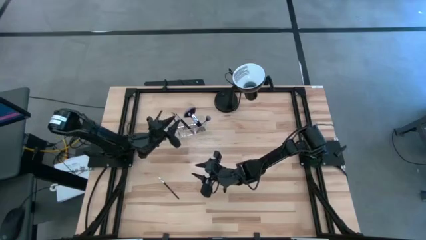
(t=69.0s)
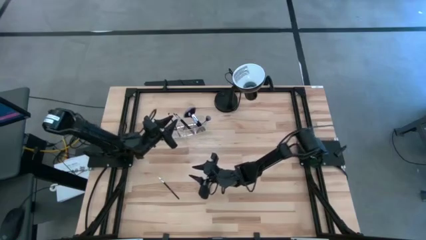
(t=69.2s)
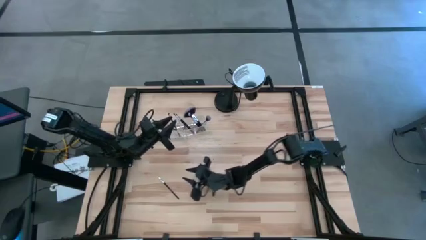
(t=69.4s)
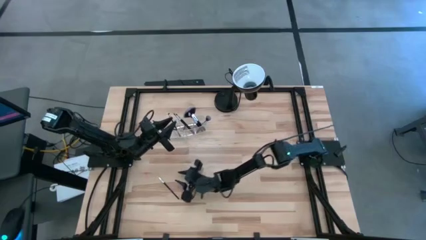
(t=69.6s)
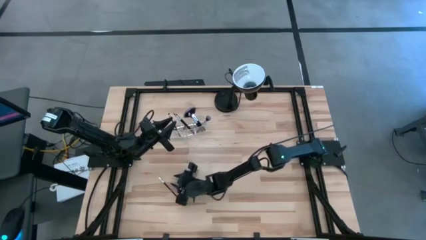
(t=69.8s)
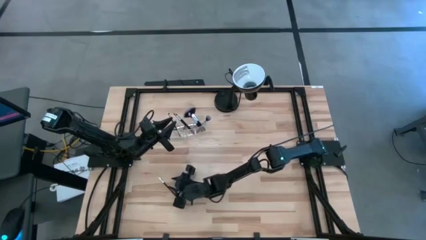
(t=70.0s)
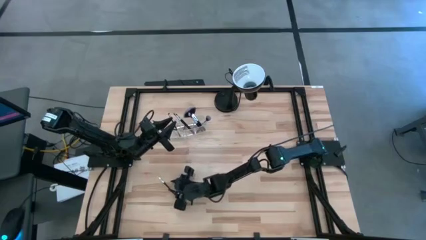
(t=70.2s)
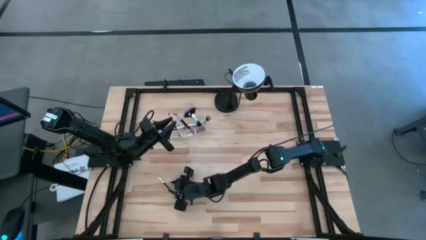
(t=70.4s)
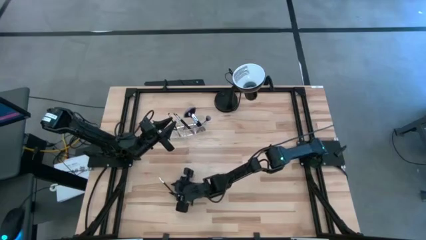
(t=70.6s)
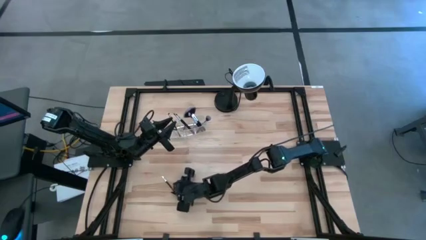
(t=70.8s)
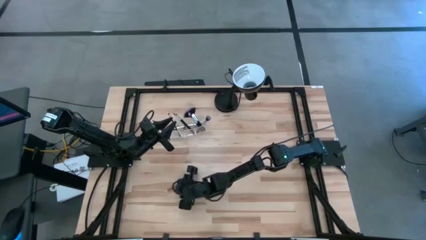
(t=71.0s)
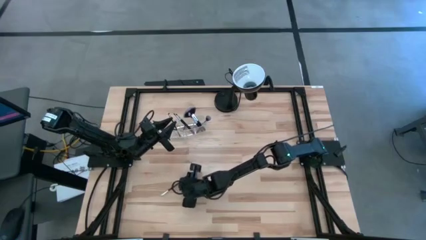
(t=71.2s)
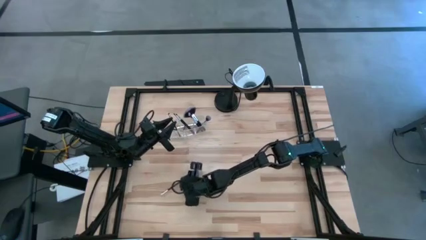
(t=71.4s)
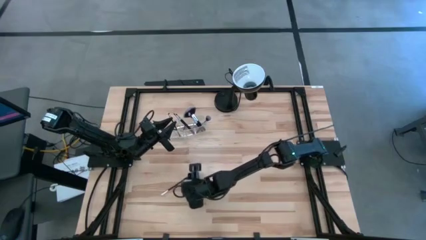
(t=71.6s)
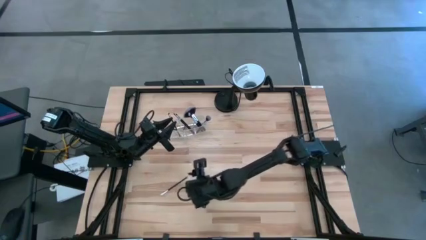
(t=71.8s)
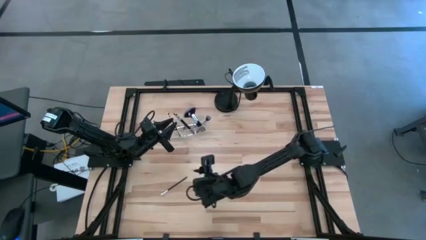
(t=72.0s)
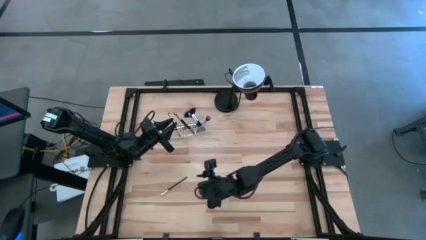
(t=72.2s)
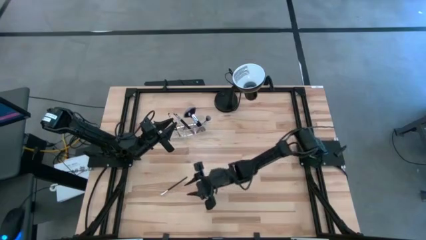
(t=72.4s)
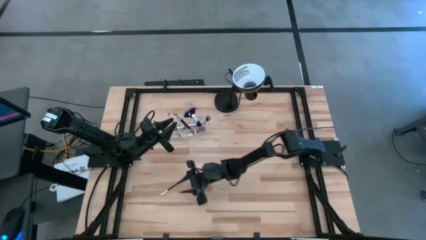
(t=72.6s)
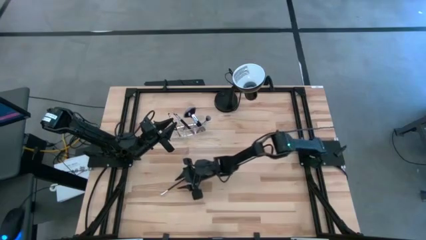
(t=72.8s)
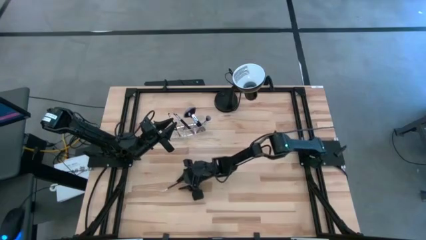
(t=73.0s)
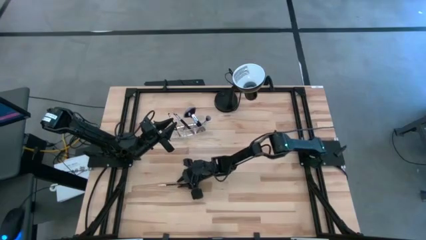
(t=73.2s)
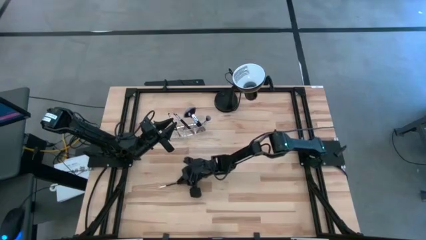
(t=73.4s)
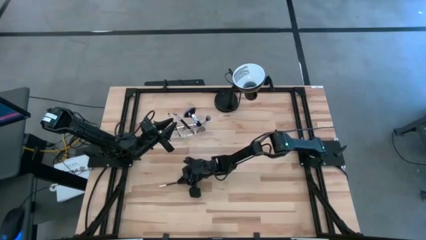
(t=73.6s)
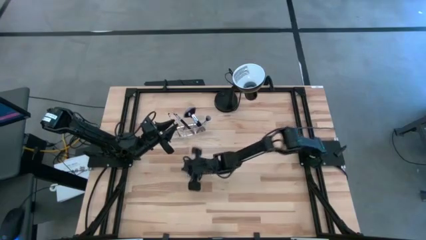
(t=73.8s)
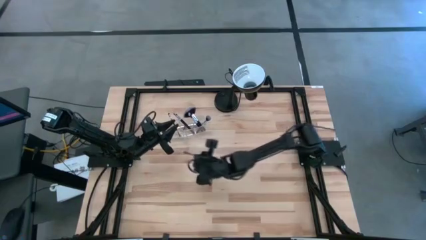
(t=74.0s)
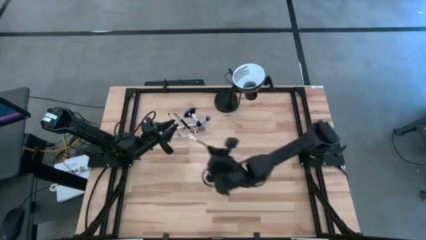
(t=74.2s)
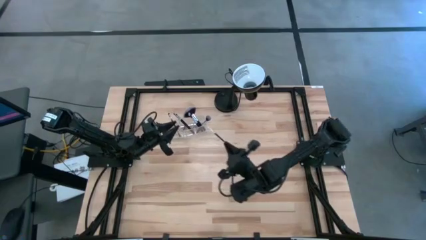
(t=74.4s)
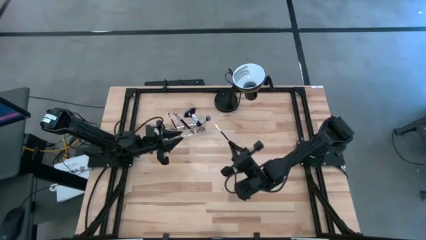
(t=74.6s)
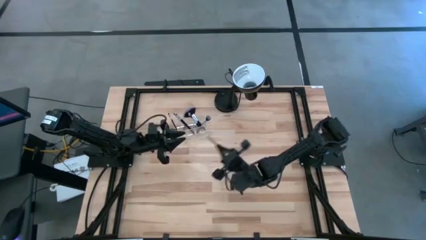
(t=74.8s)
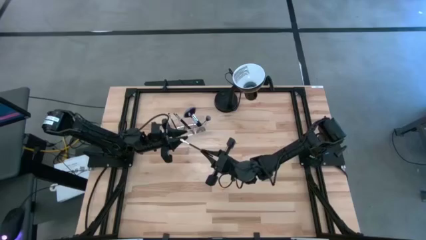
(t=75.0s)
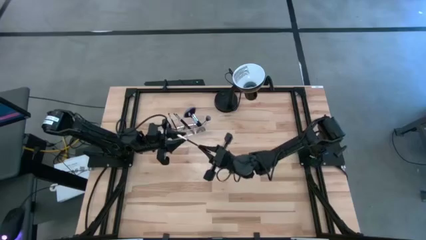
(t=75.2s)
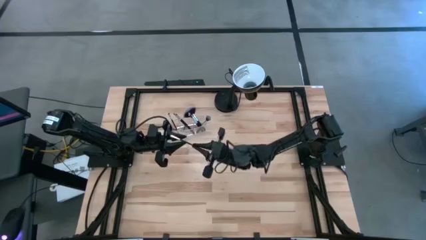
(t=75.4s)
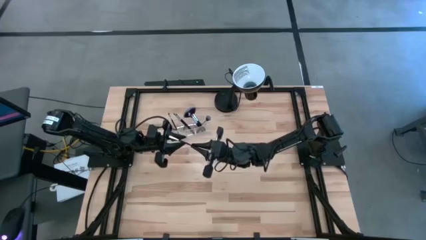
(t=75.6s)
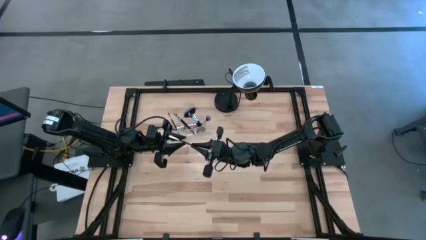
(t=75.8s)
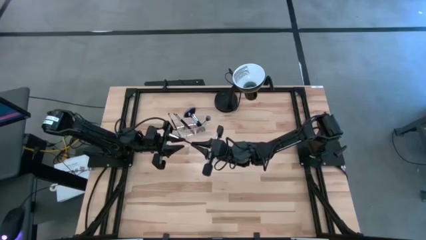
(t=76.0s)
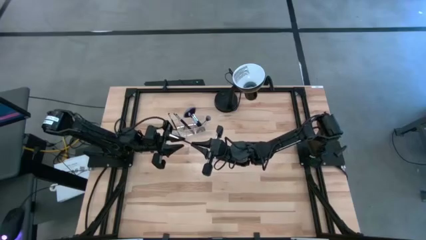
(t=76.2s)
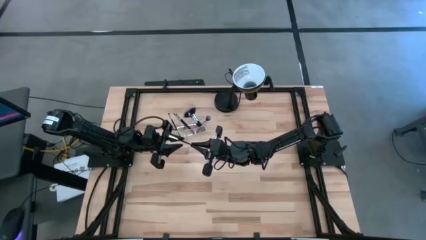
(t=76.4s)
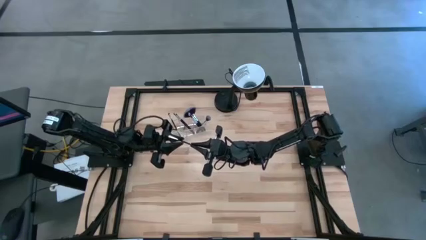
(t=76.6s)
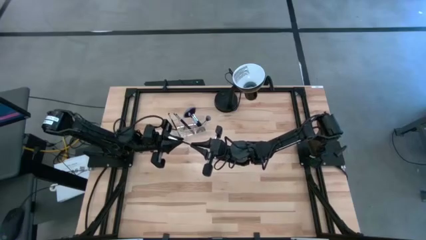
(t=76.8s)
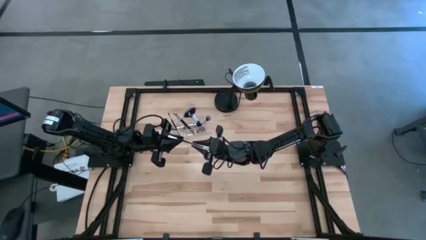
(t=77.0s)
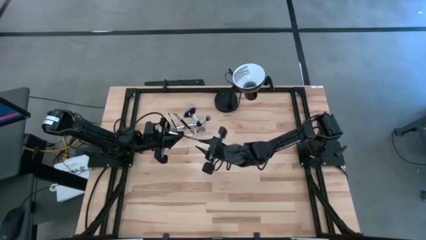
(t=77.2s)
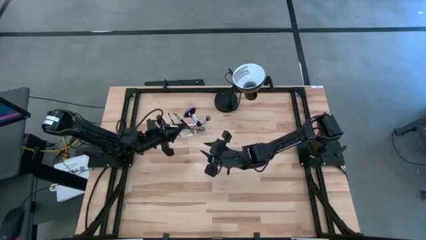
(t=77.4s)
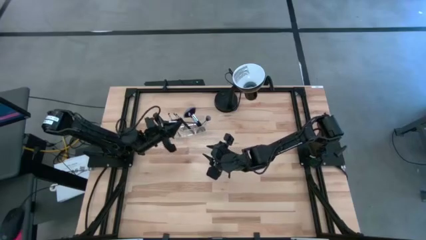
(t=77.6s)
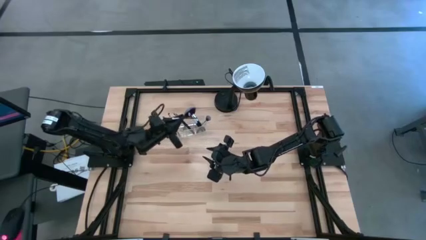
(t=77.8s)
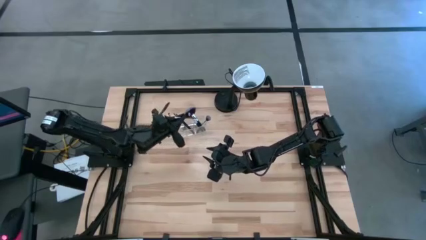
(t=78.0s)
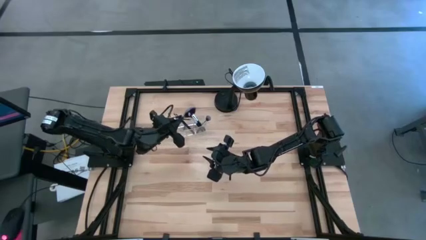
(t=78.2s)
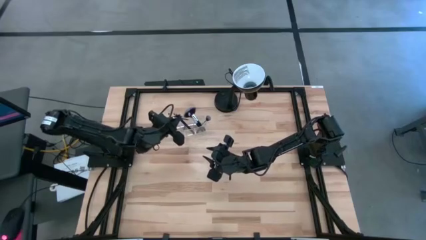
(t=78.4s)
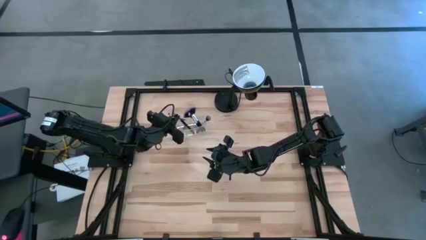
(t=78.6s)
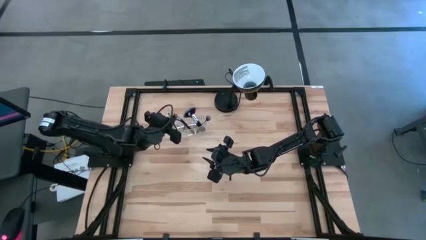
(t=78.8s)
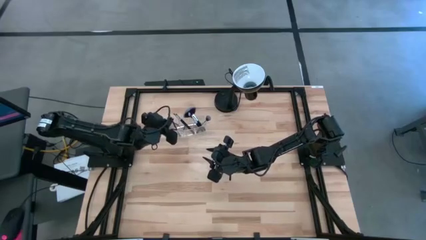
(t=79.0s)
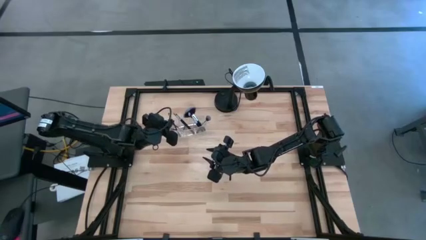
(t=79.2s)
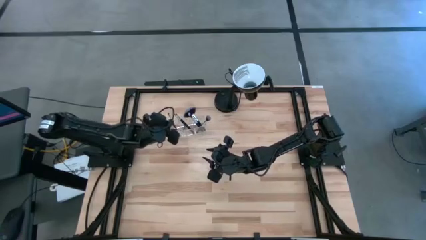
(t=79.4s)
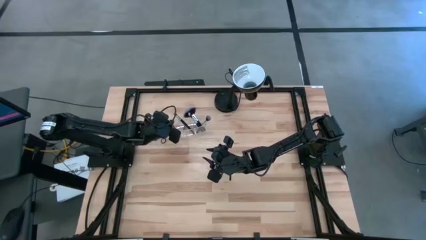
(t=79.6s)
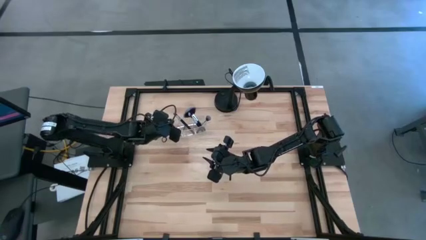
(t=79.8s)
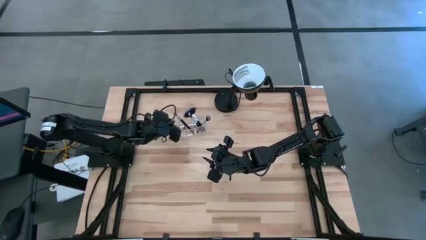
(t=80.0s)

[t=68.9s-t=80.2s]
Task: Put items in baskets/containers
Put the black eyeshadow brush into the transparent organizer

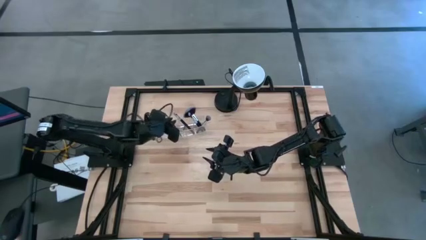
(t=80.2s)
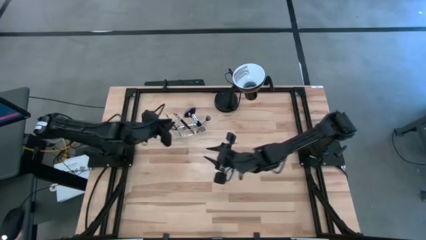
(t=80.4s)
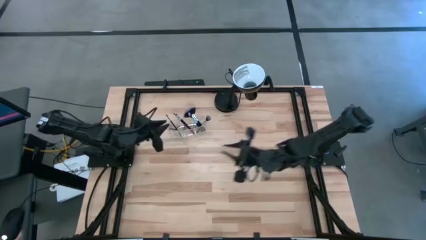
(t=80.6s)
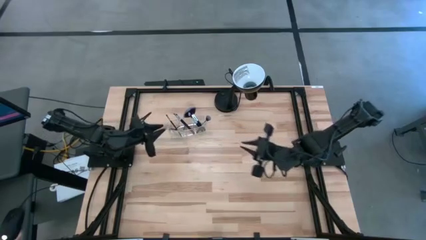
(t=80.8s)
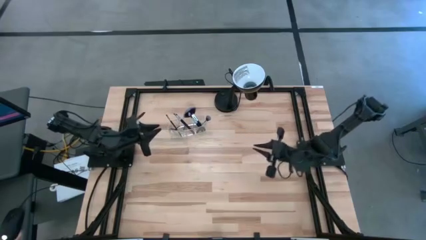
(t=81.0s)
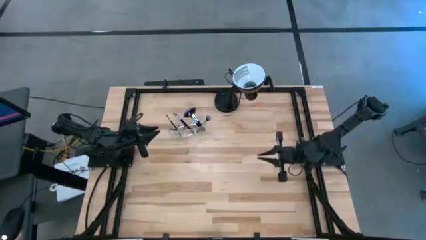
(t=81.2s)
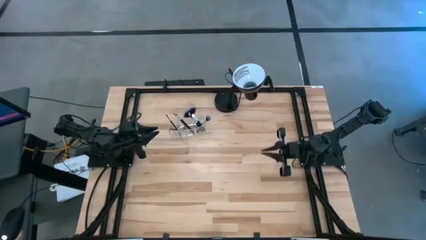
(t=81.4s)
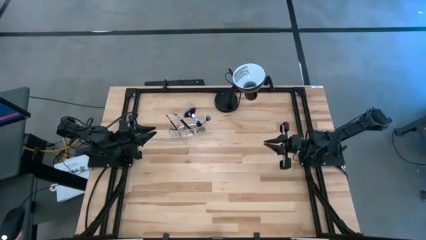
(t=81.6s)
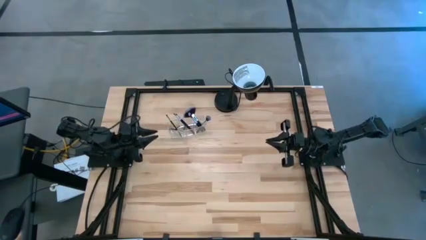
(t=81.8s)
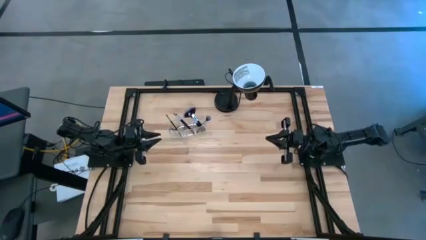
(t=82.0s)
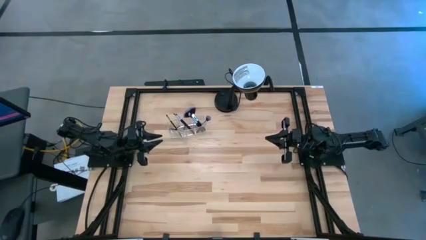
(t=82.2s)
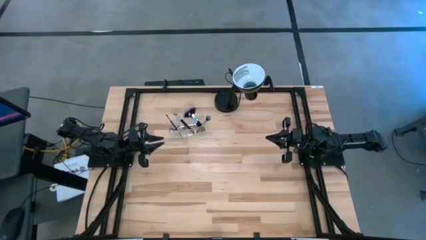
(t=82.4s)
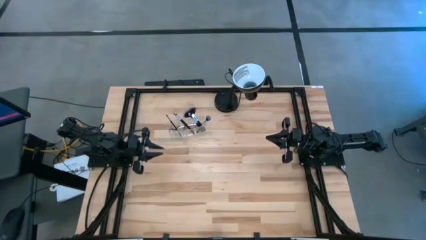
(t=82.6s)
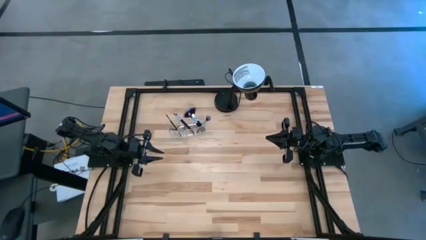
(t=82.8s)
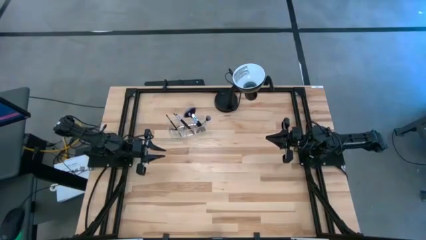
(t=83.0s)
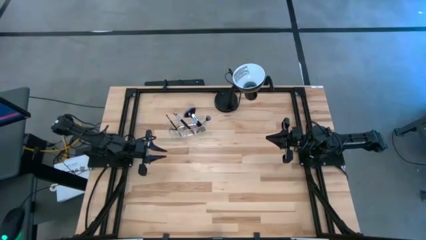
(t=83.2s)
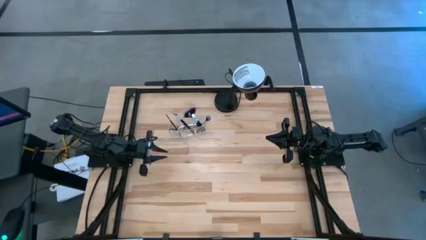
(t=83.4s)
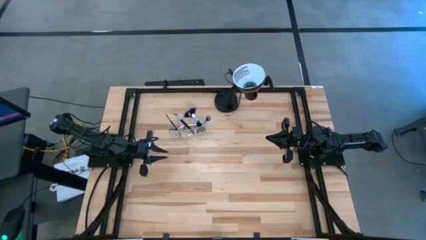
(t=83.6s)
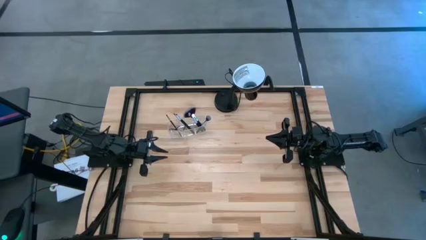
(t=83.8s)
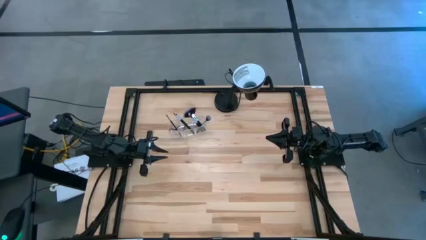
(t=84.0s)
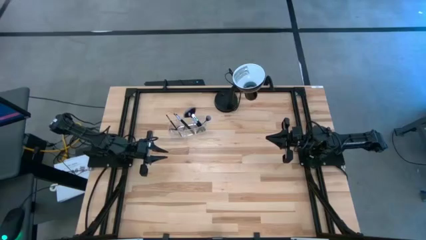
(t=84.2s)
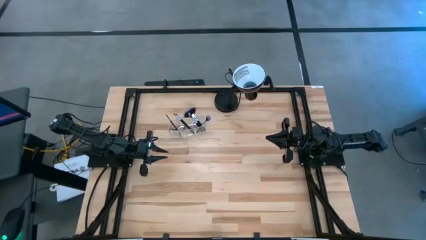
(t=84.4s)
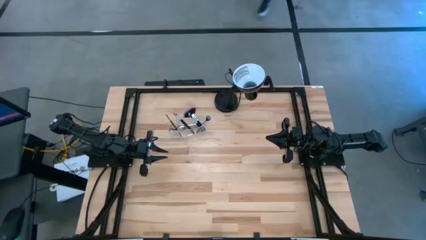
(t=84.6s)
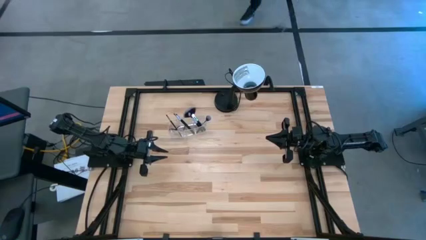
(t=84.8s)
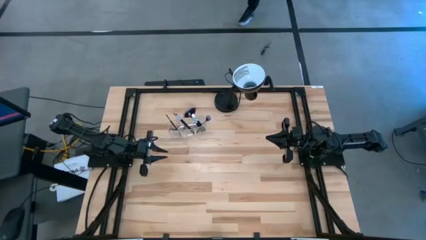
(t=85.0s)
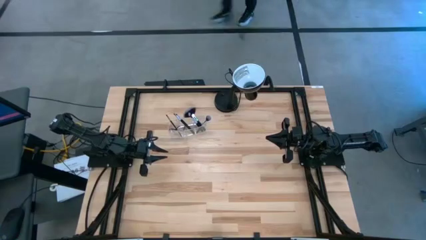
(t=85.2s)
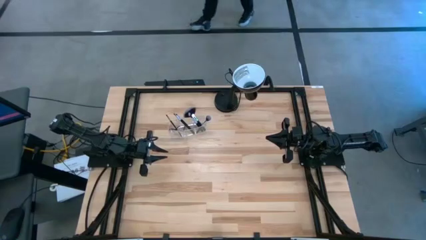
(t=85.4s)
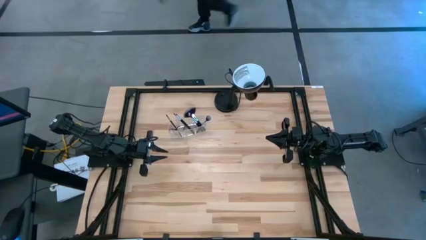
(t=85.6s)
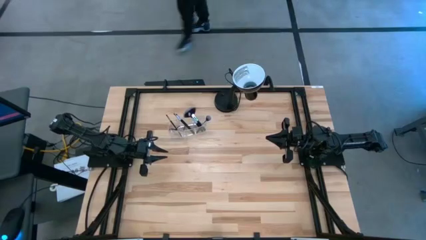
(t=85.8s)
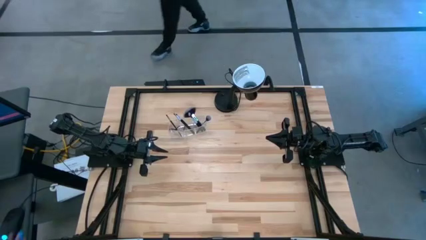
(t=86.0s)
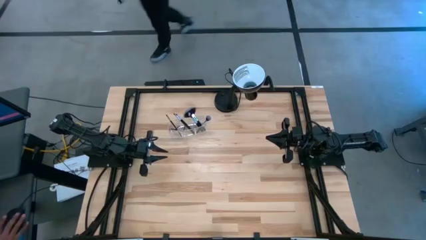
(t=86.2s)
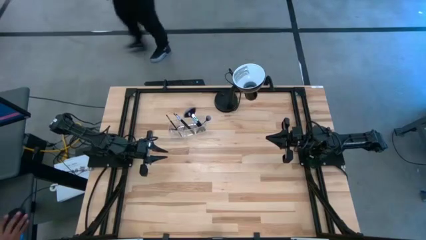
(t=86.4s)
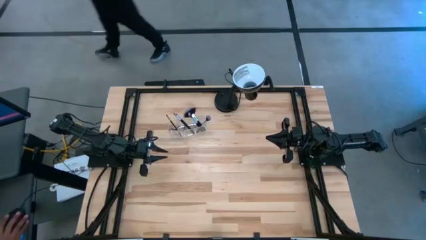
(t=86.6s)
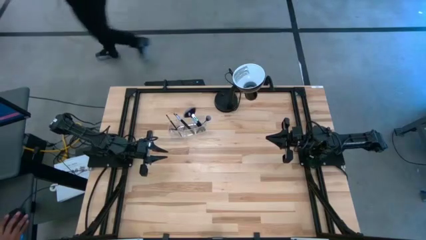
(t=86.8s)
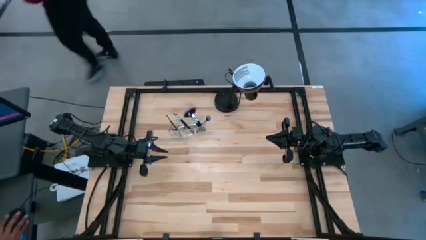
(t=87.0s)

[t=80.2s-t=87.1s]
Return to Home Position
